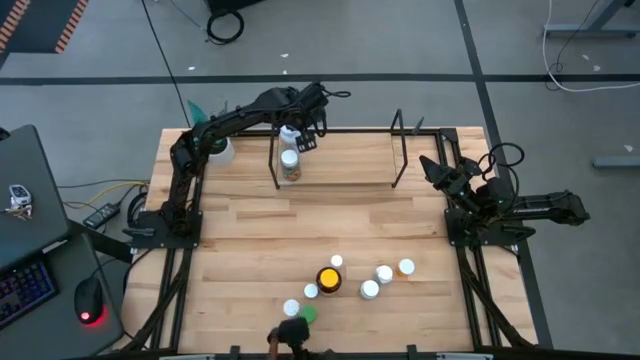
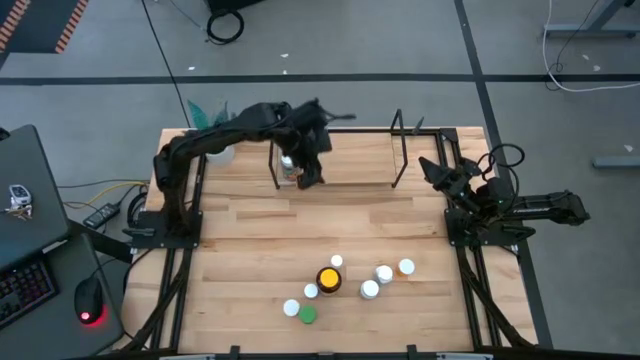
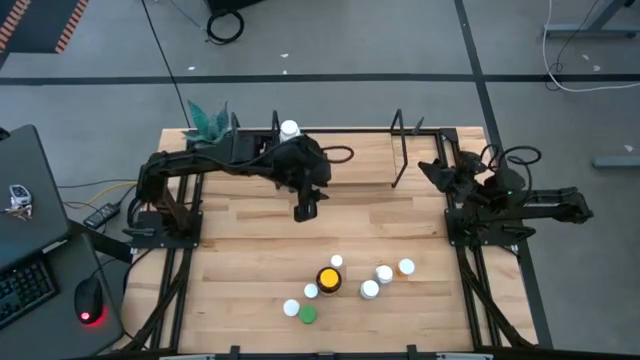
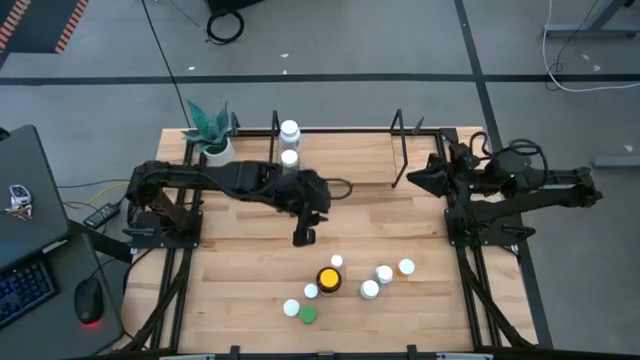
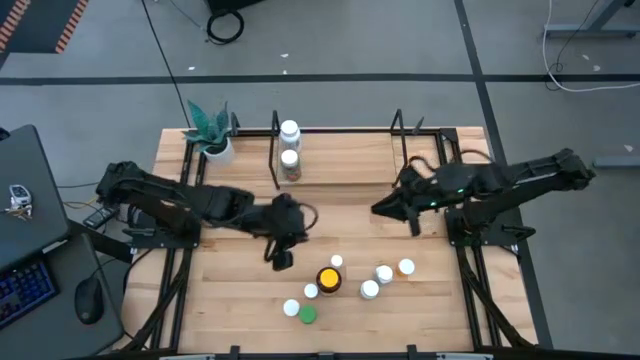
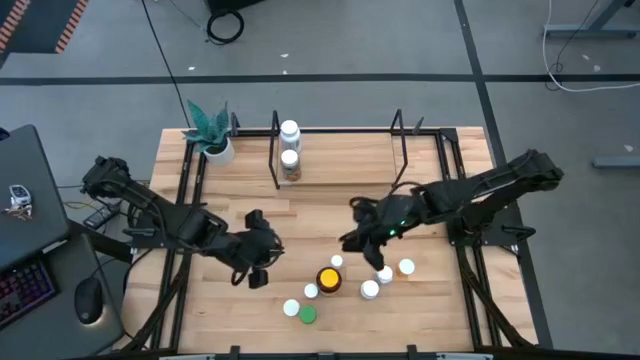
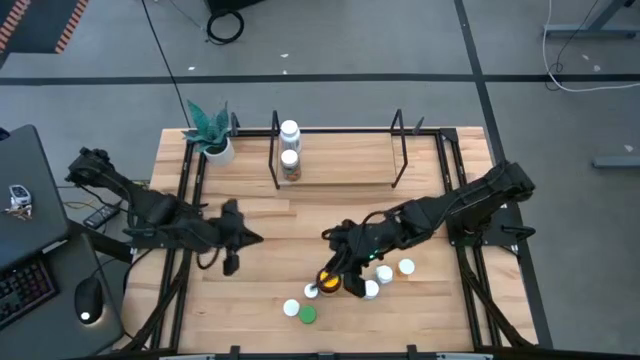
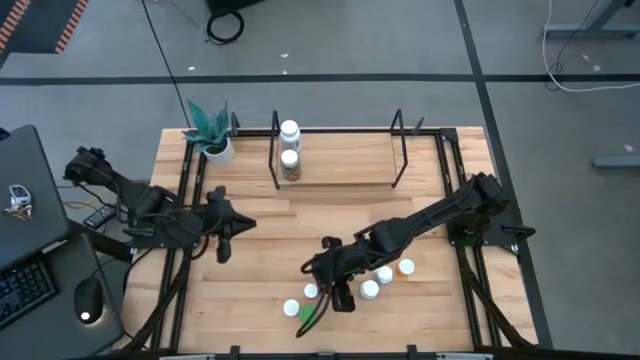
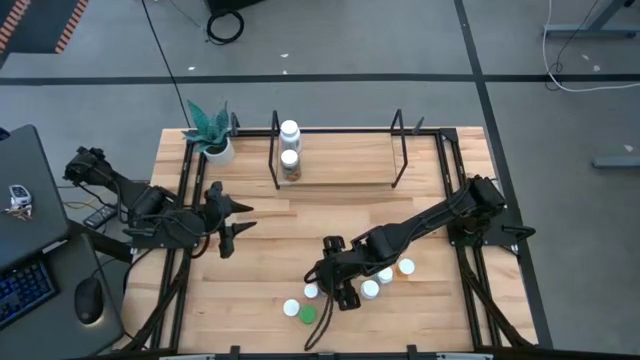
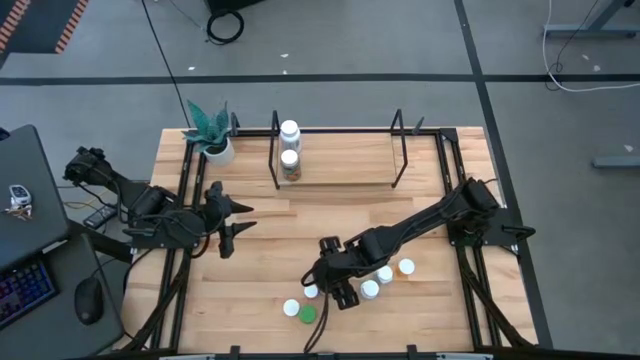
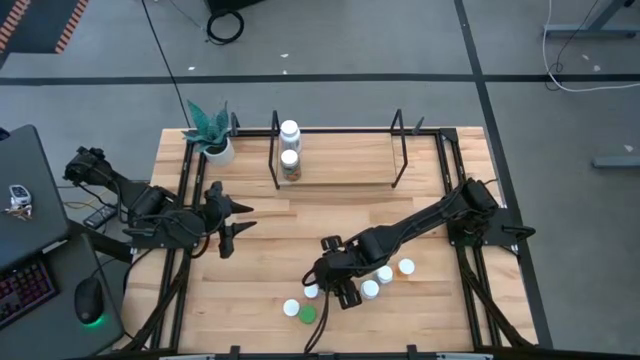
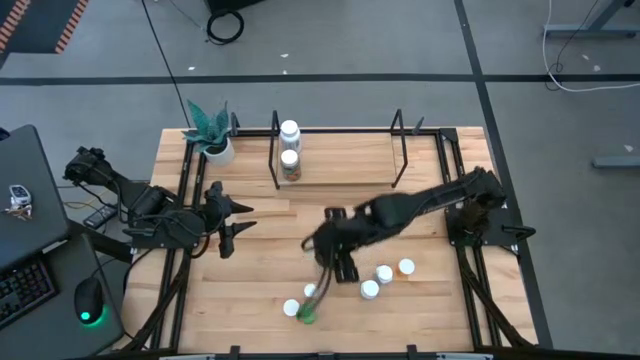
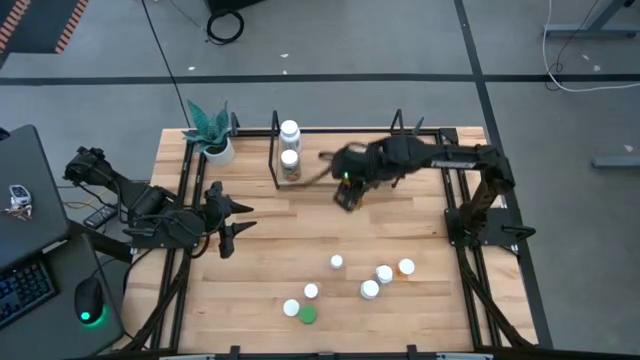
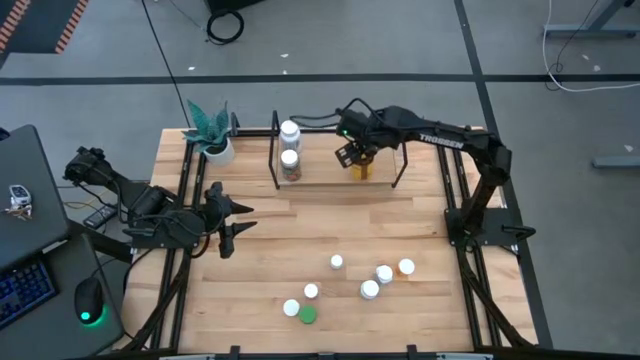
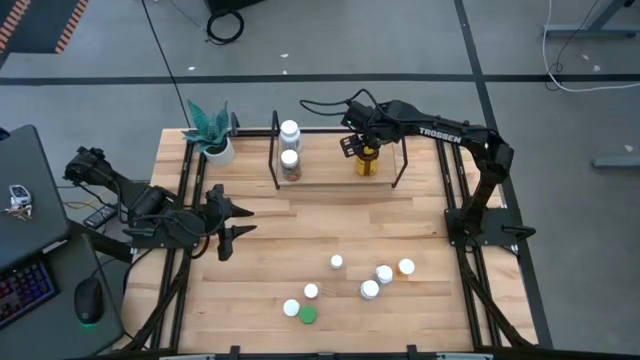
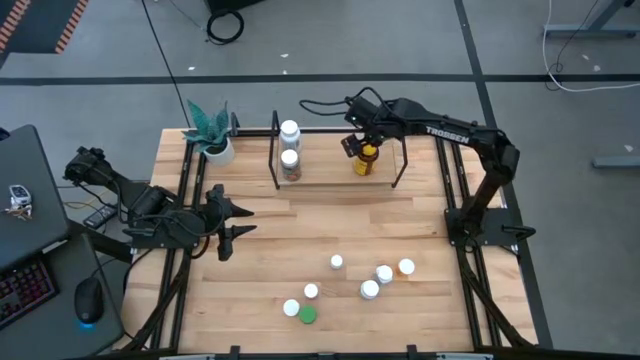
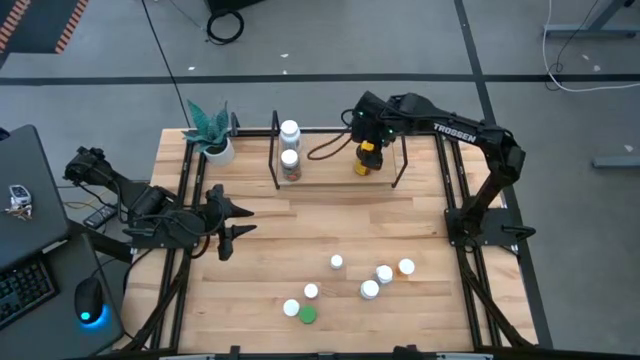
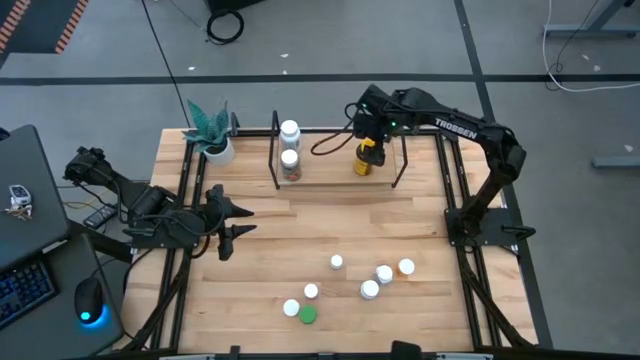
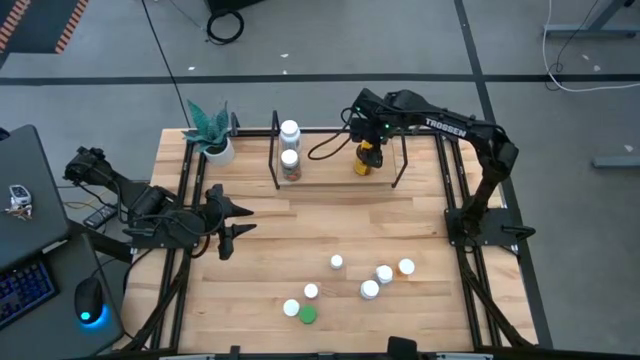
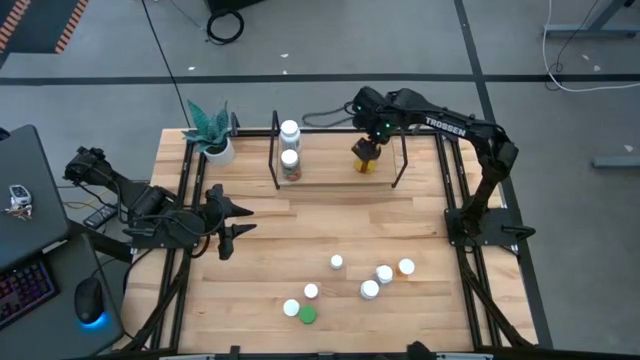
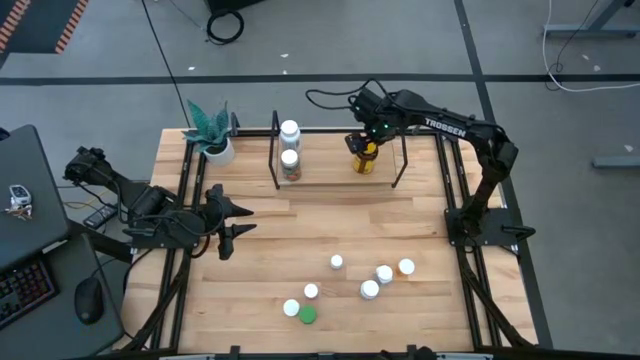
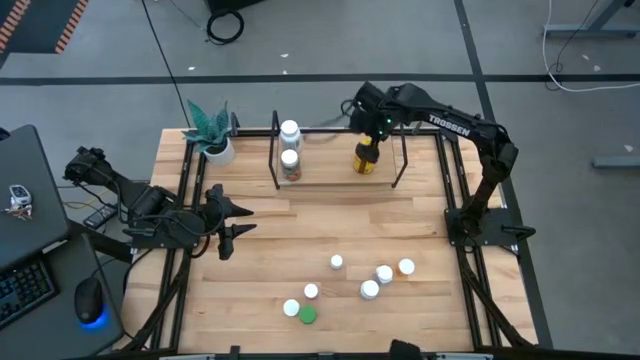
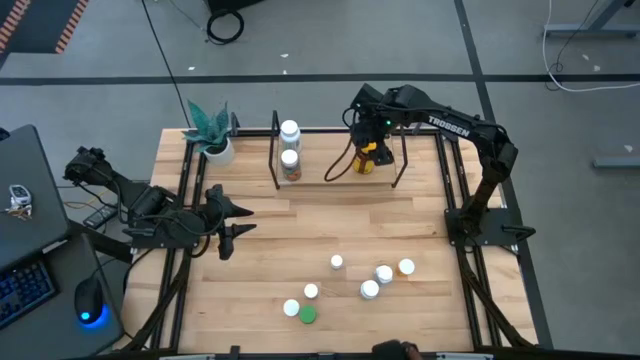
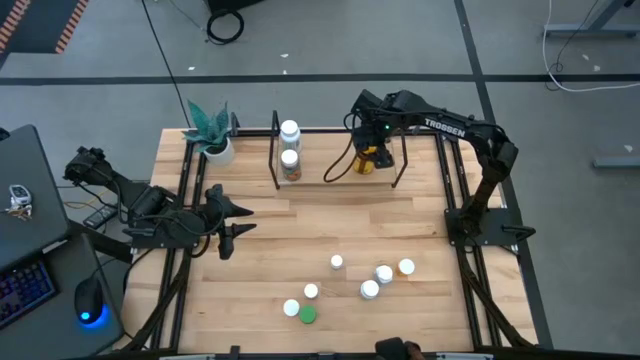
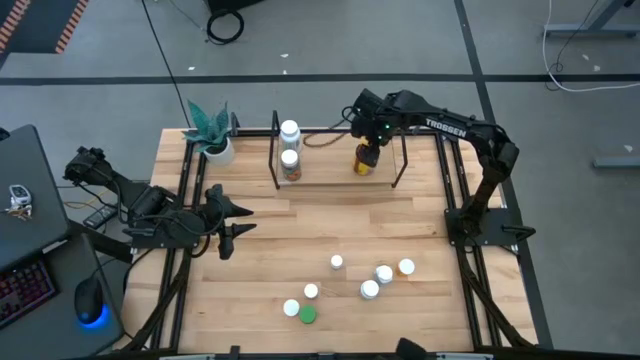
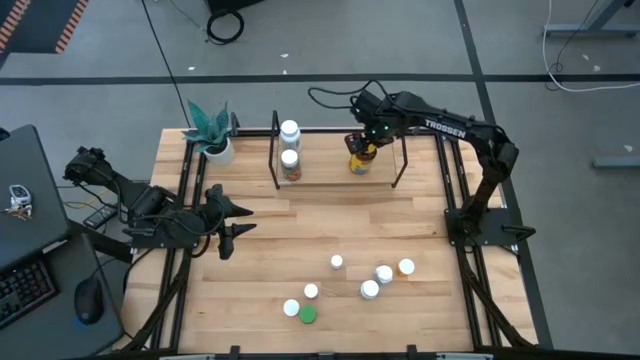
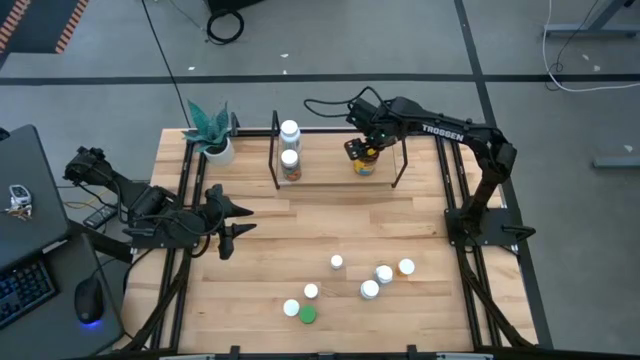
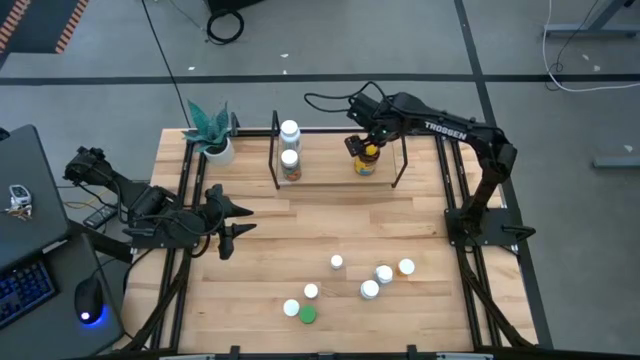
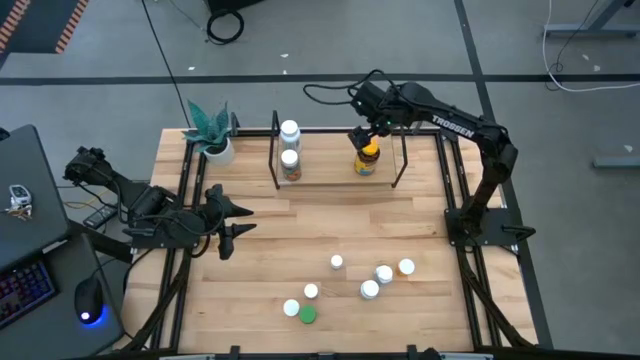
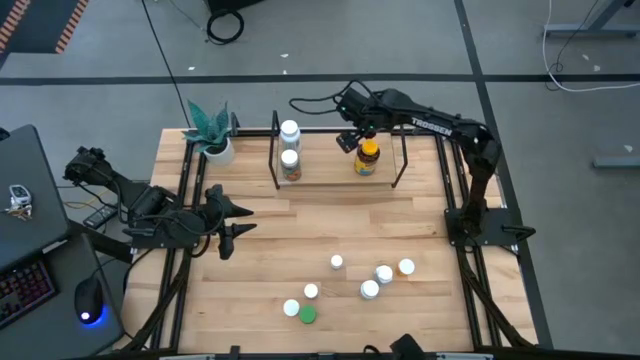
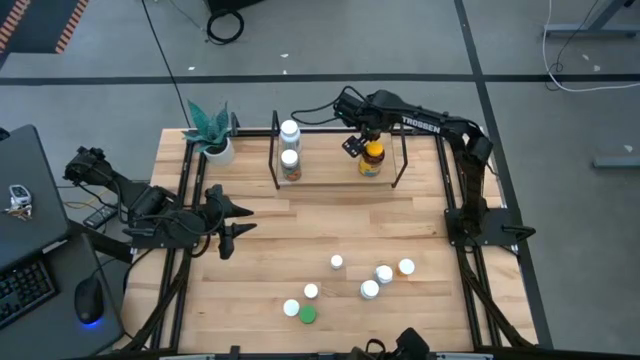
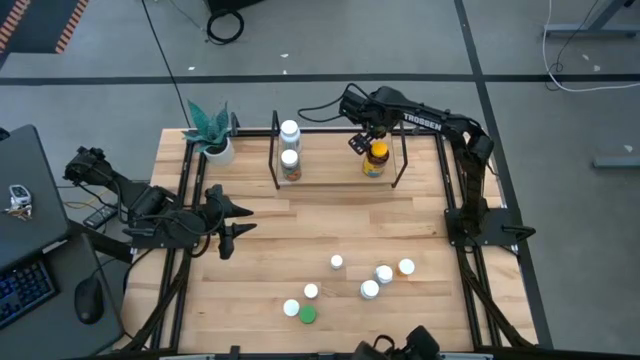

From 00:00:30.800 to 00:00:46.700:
Task: Pick and place medicine bottles onto shelf by color
Put the yellow pill bottle on the shelf

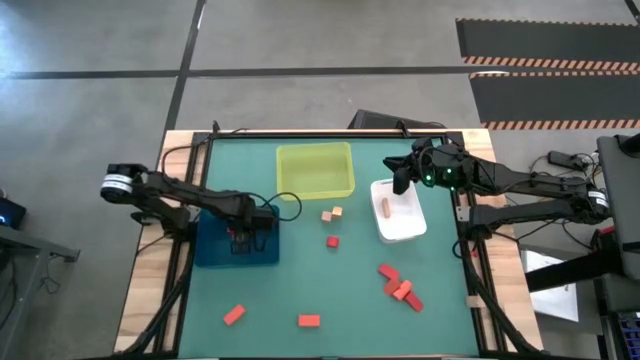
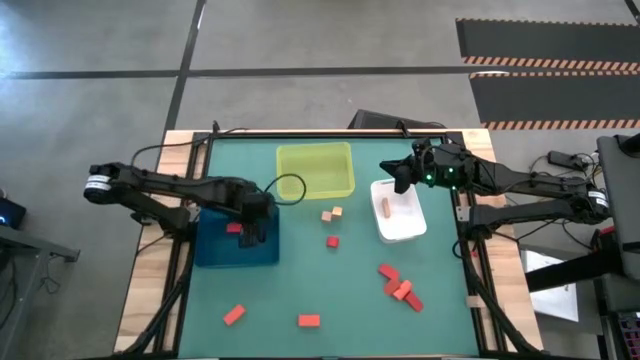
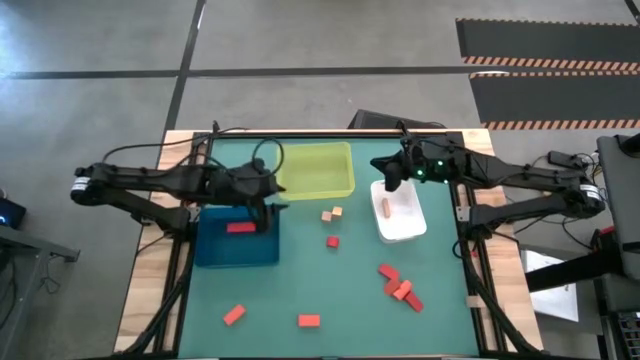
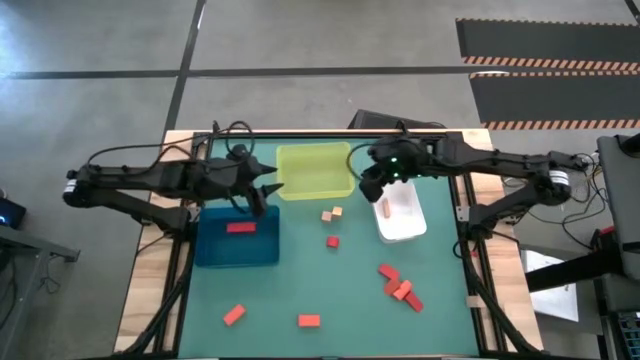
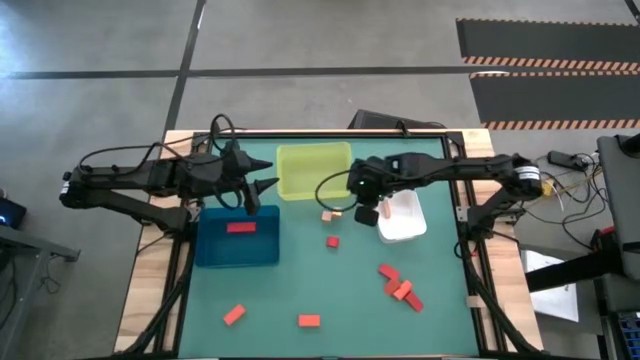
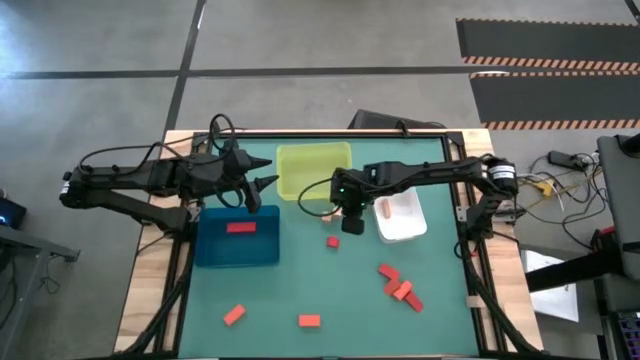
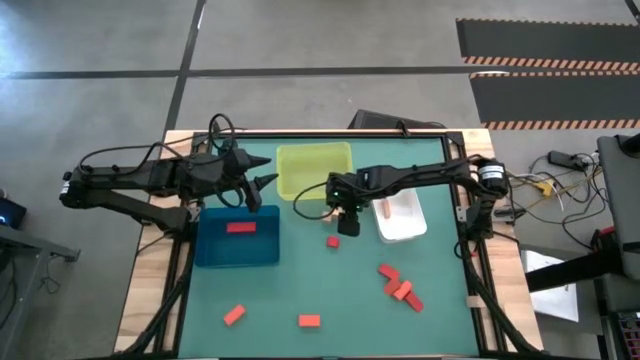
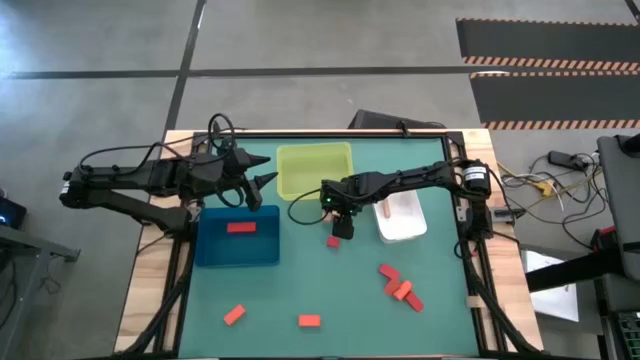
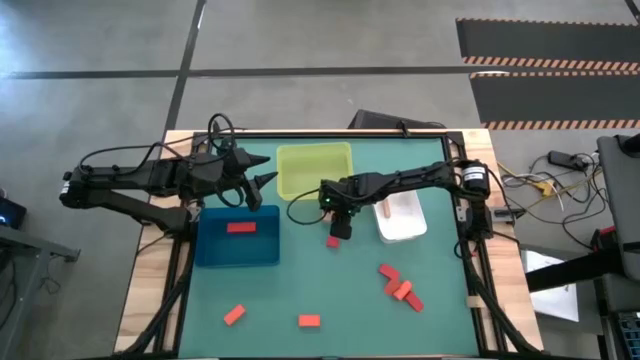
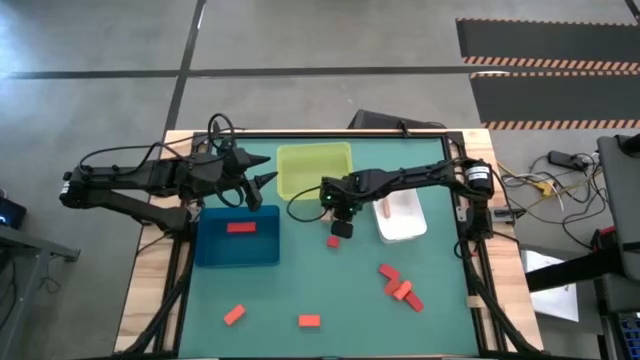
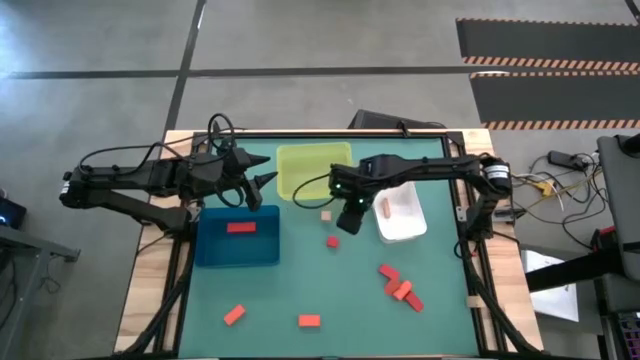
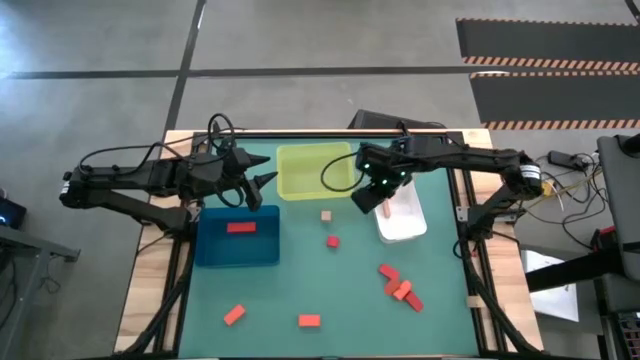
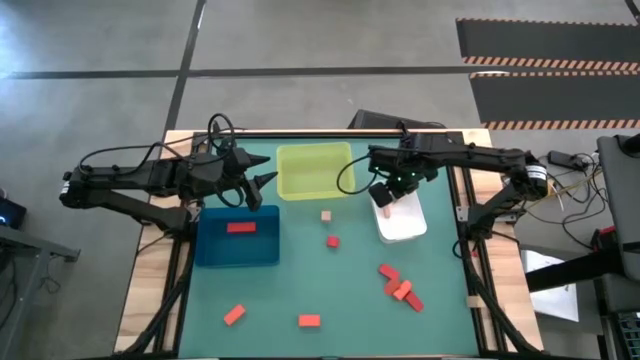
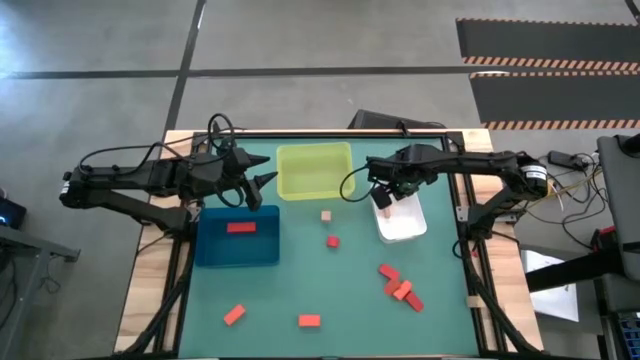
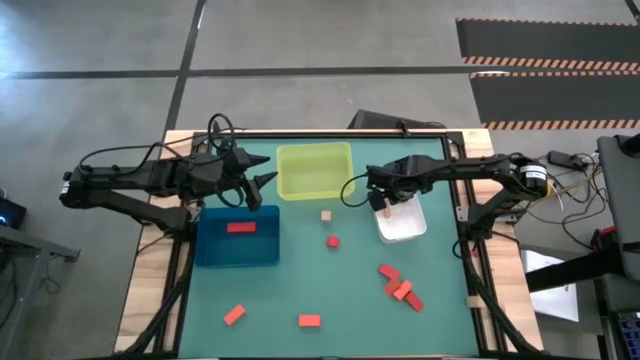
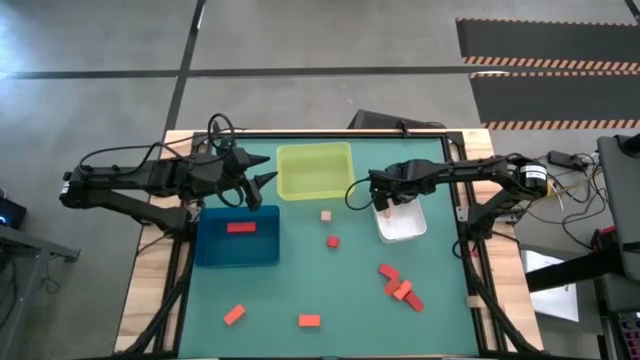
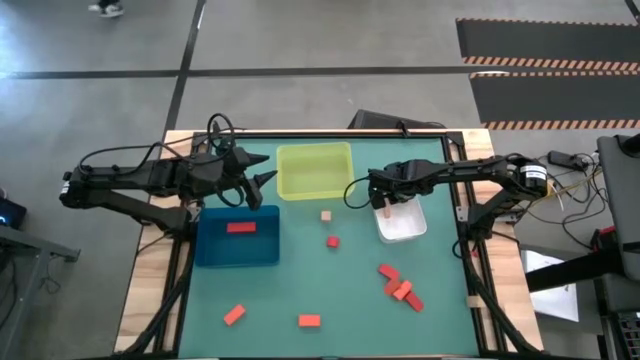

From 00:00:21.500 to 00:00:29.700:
Task: Sort & place blocks by color
Put the brown block into the white bin
